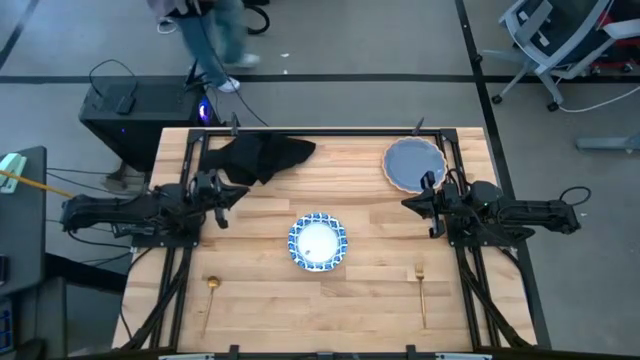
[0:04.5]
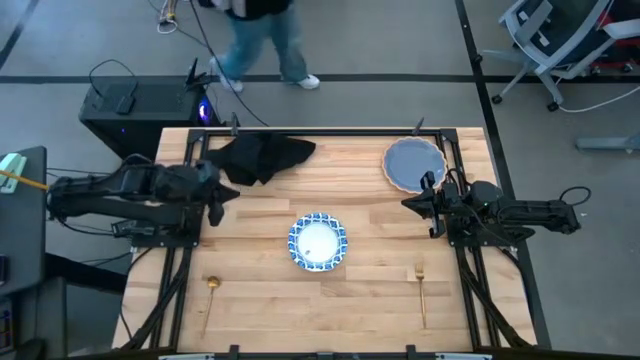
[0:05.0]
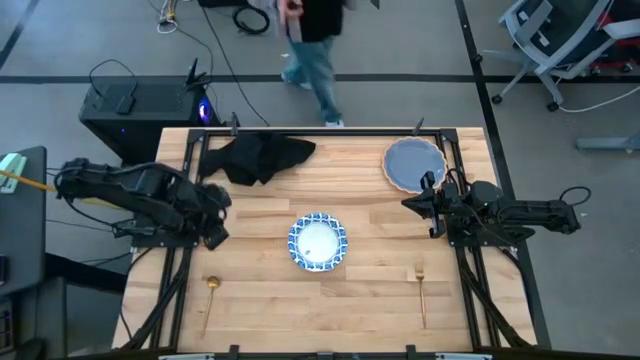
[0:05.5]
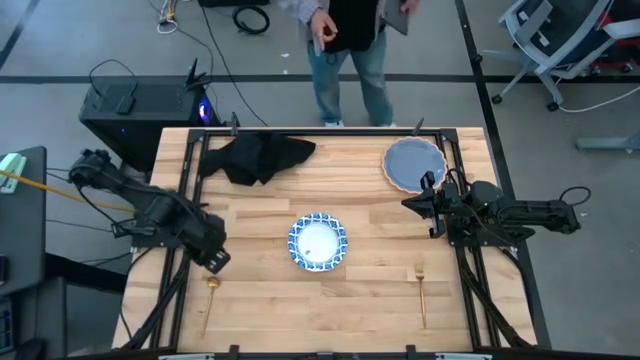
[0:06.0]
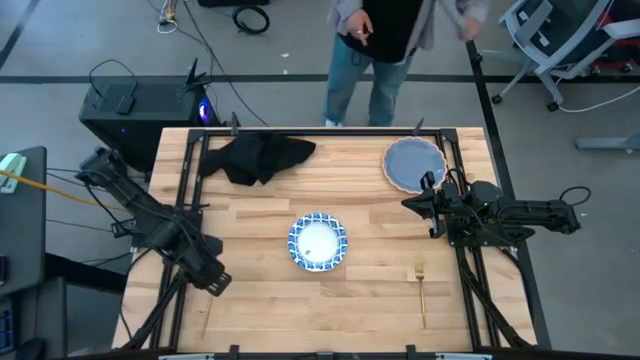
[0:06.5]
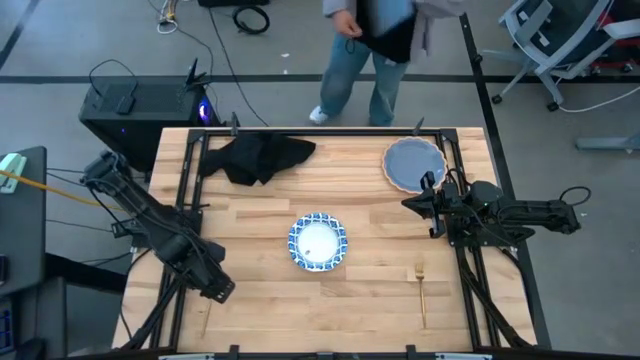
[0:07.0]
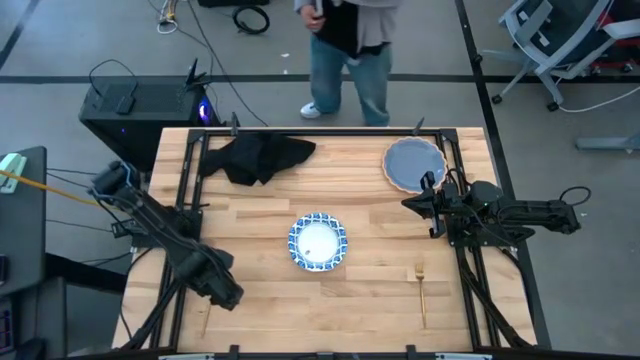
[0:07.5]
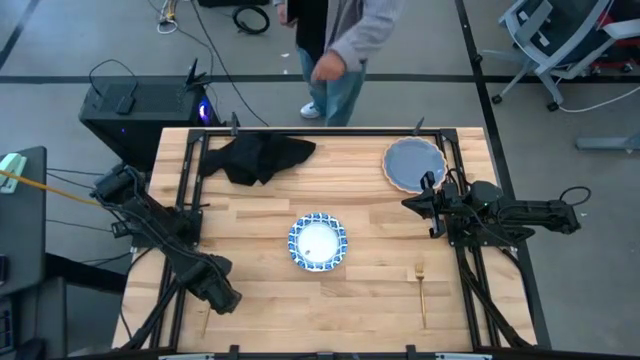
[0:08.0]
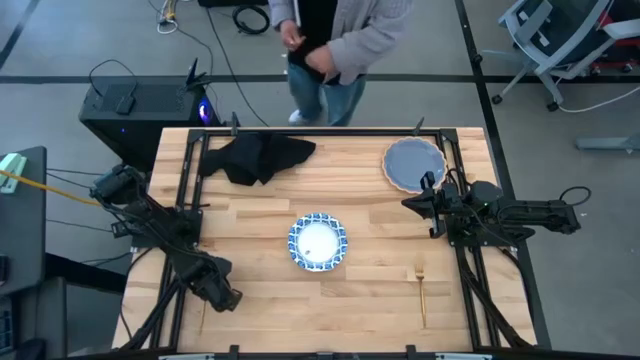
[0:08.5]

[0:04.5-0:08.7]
Task: Set table place
Move the golden spoon to the left of the white bowl

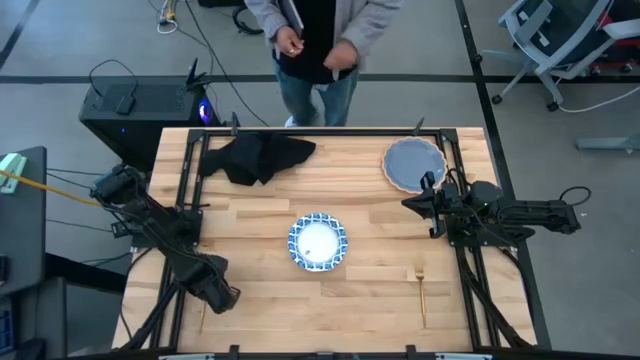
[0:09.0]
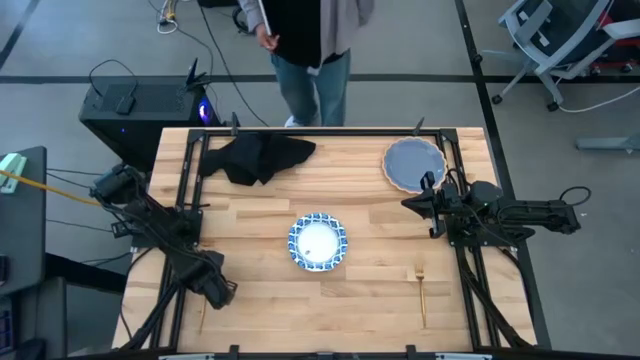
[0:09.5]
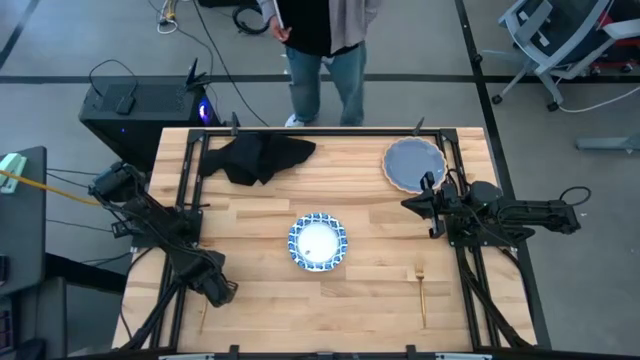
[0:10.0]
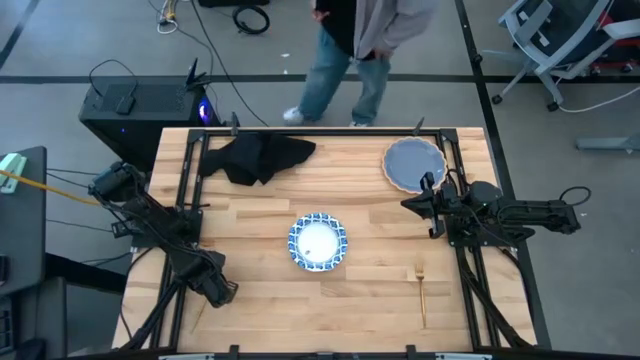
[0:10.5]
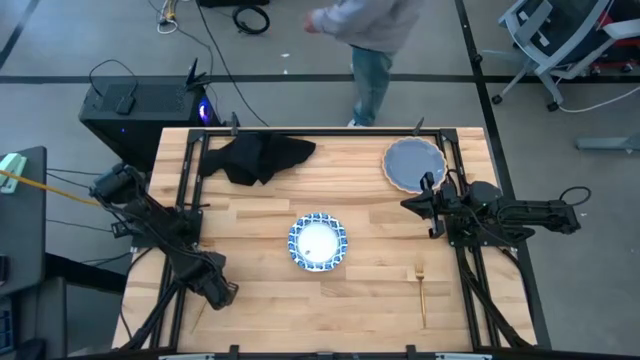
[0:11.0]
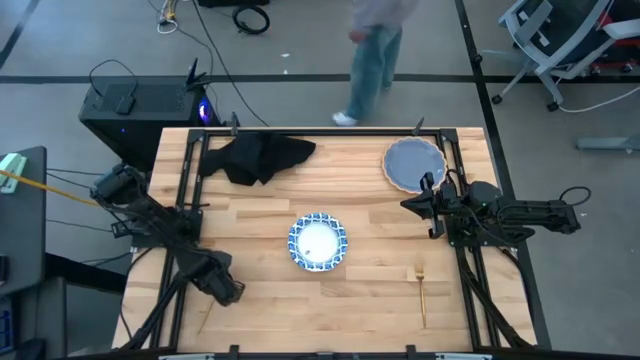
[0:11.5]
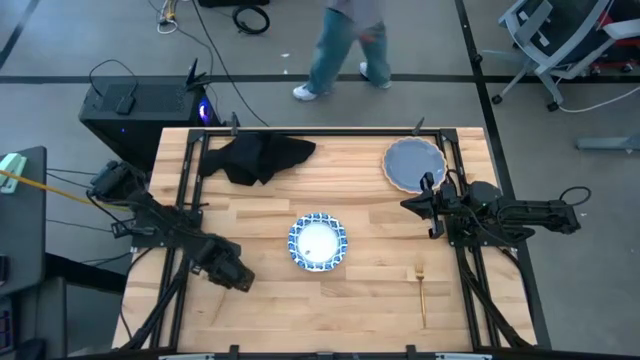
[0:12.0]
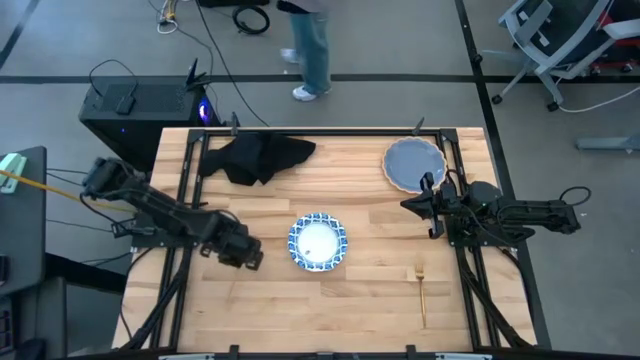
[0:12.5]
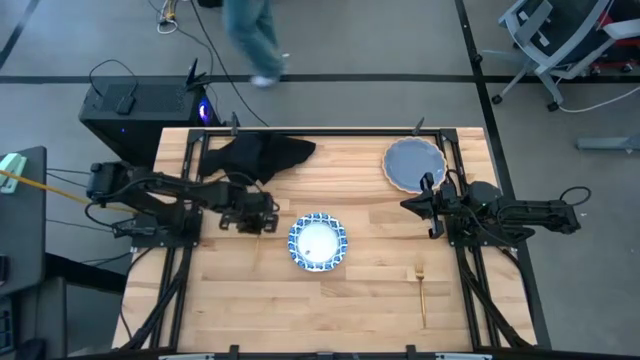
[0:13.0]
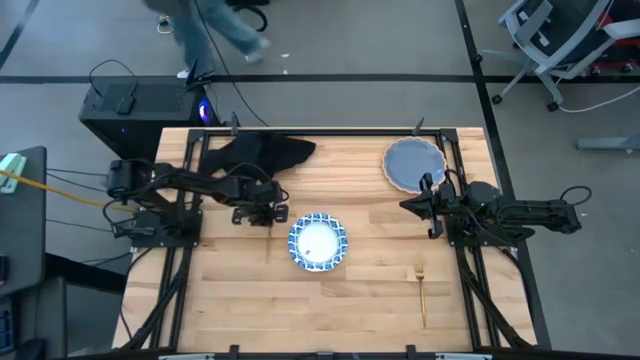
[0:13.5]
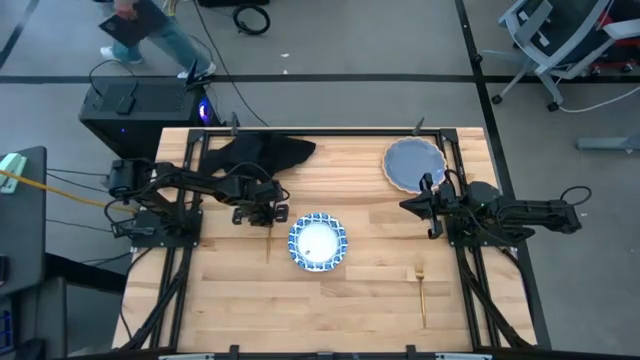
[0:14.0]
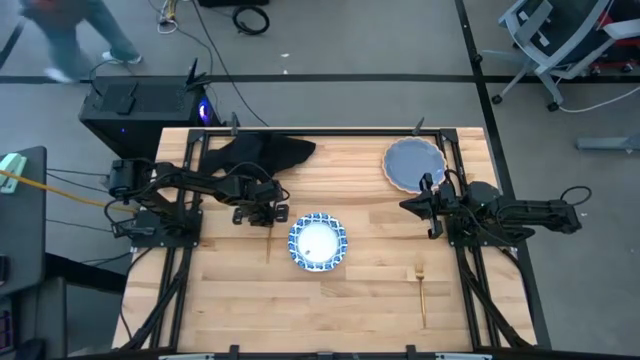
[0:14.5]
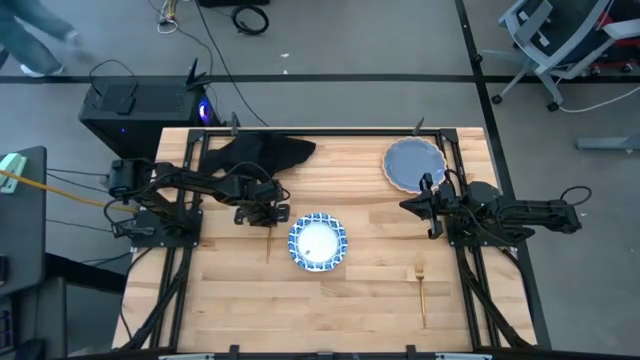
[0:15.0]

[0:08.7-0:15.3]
Move the golden spoon to the left of the white bowl

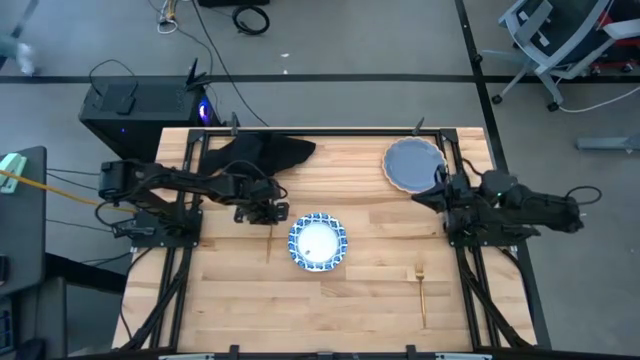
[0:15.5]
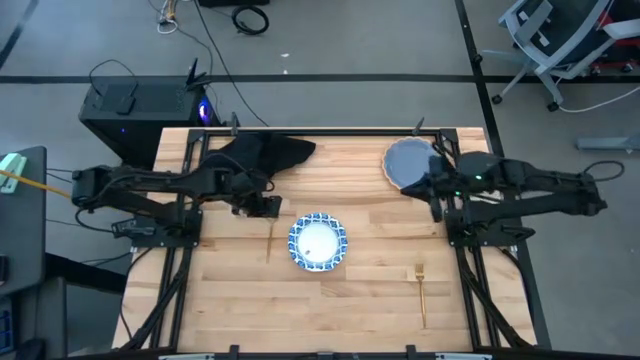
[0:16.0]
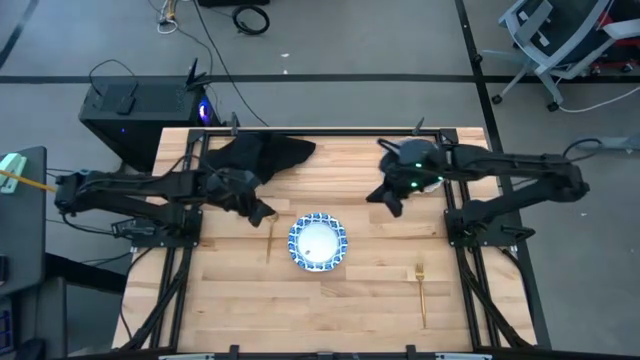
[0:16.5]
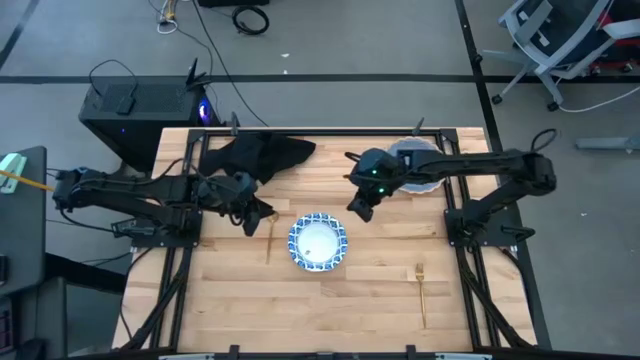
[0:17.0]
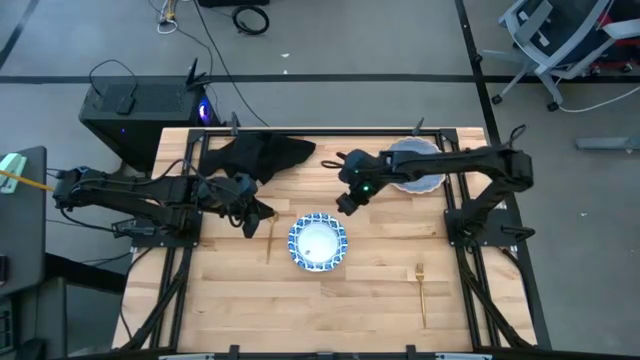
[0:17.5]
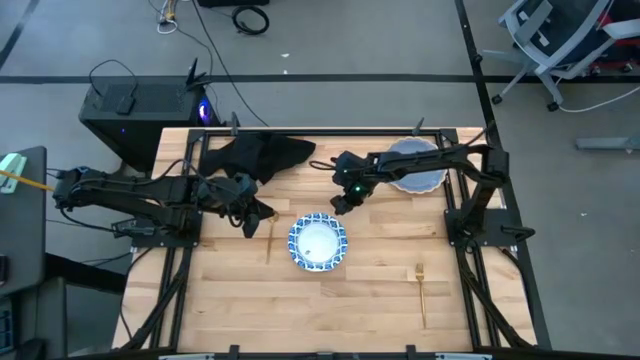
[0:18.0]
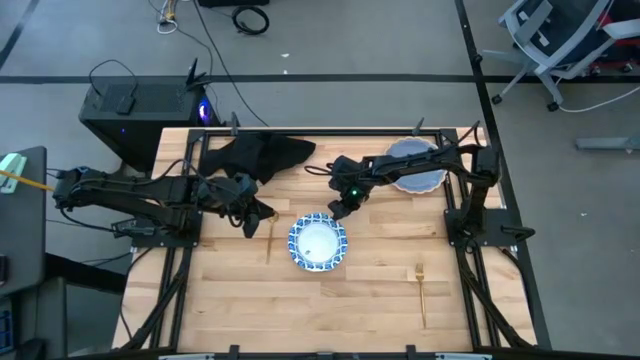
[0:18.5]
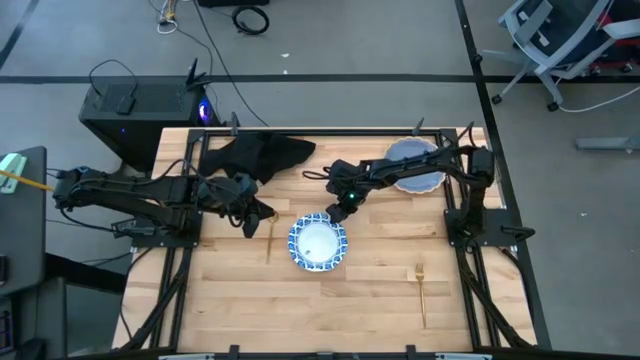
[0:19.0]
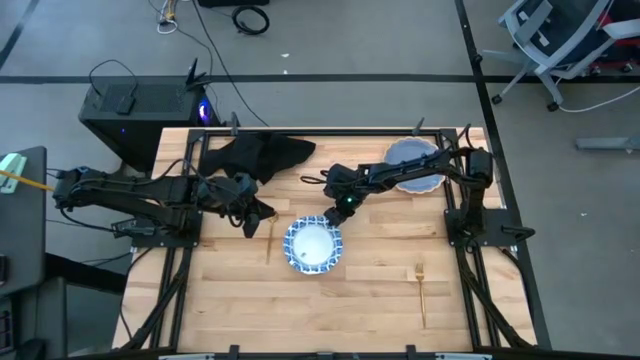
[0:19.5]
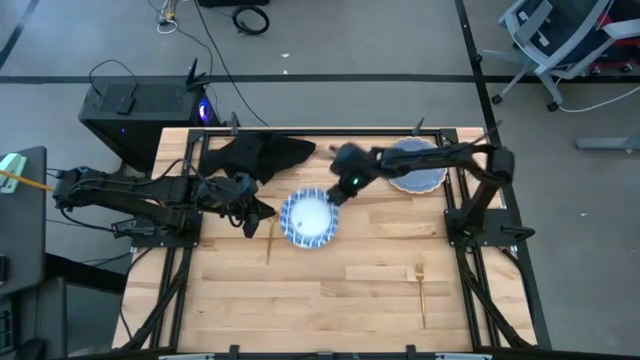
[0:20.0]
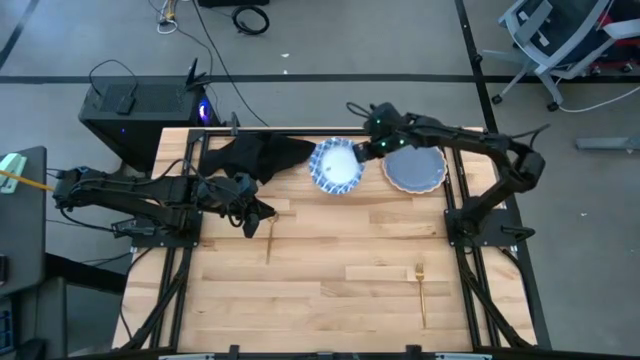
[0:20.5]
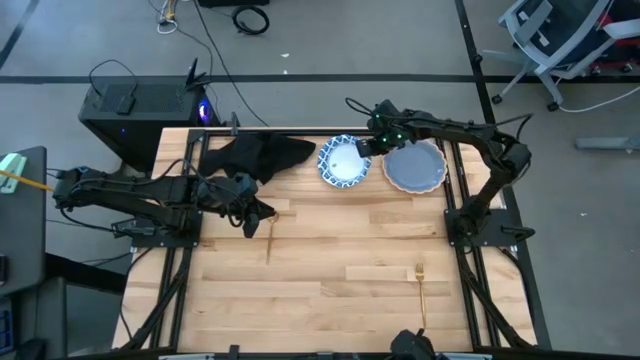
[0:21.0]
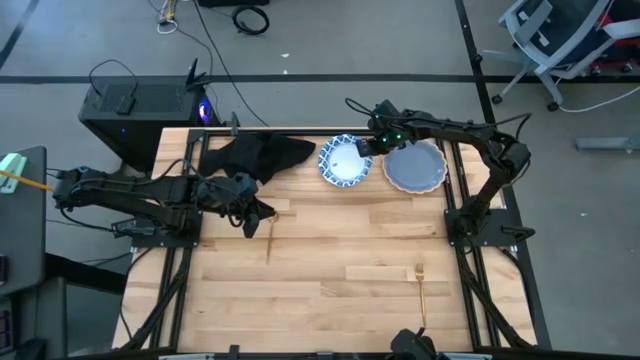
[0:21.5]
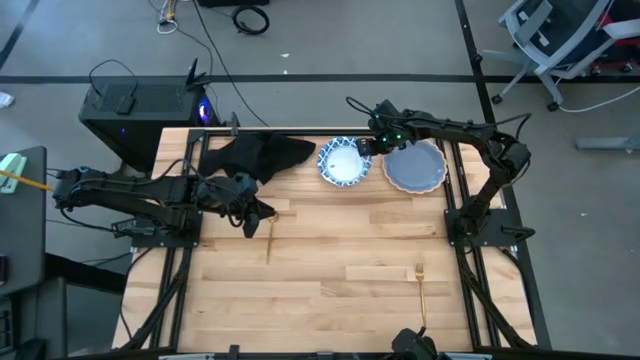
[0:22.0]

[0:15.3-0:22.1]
Move the white bowl to the top of the table

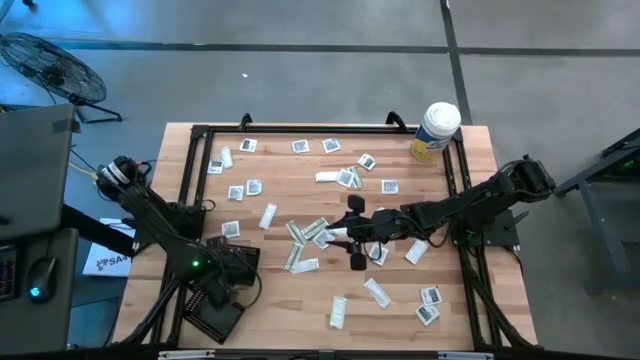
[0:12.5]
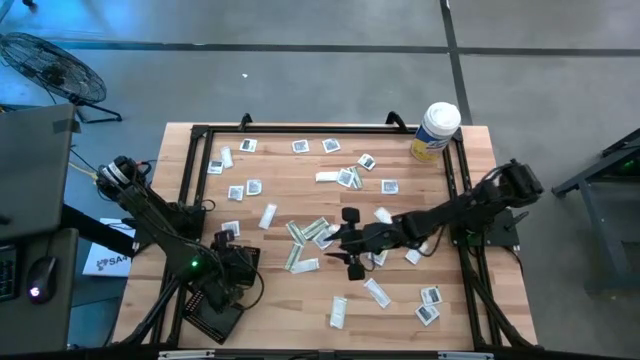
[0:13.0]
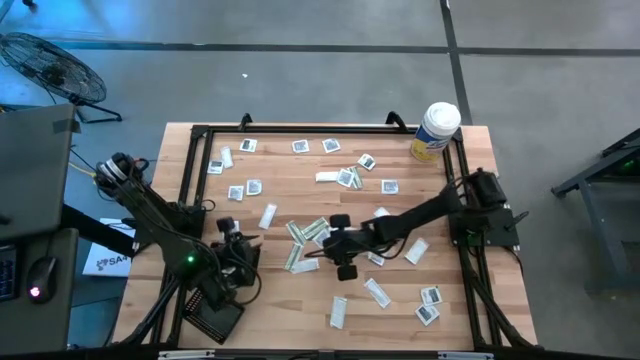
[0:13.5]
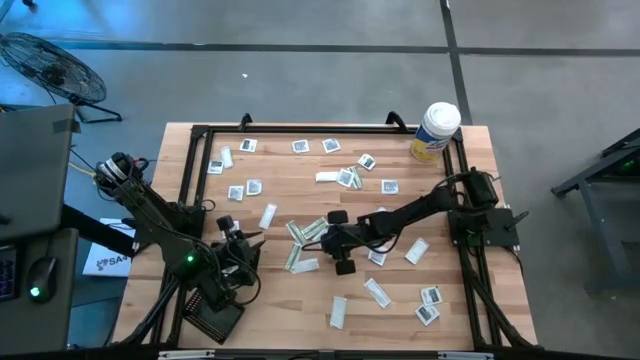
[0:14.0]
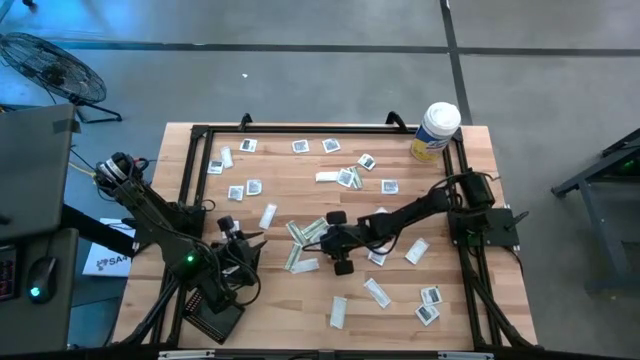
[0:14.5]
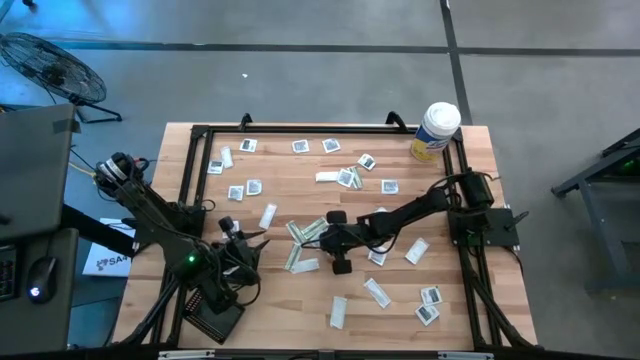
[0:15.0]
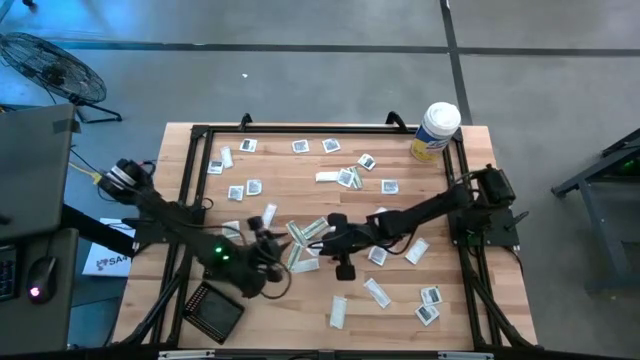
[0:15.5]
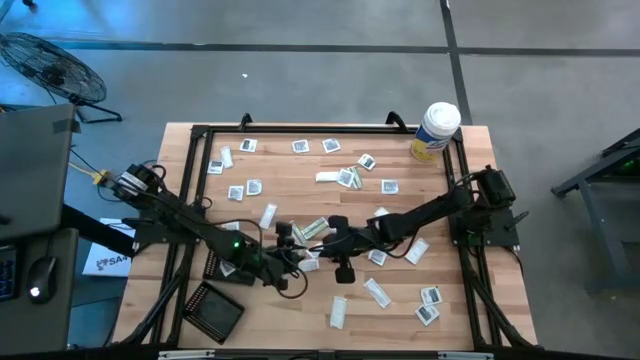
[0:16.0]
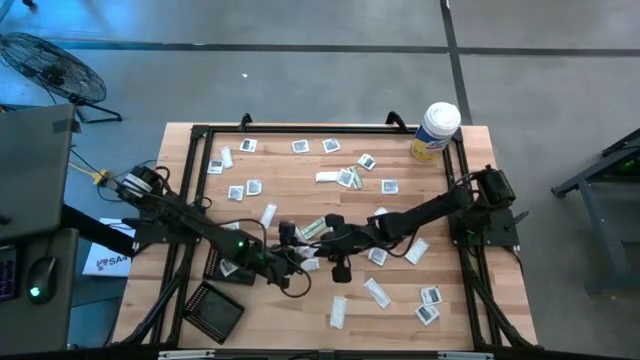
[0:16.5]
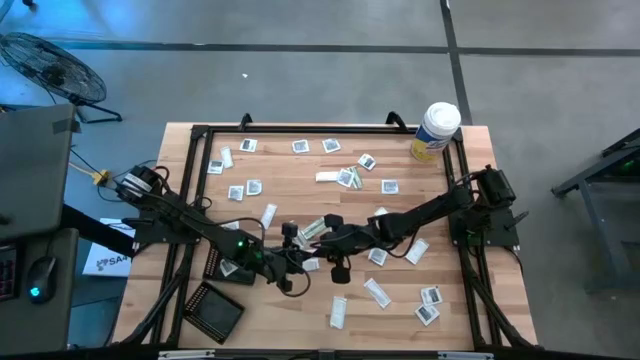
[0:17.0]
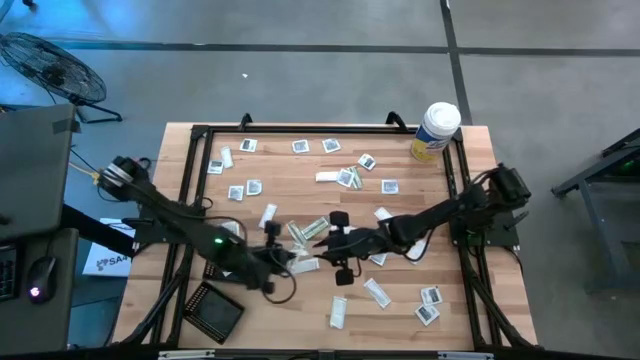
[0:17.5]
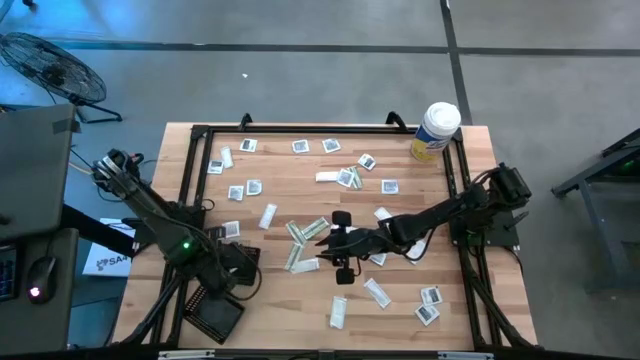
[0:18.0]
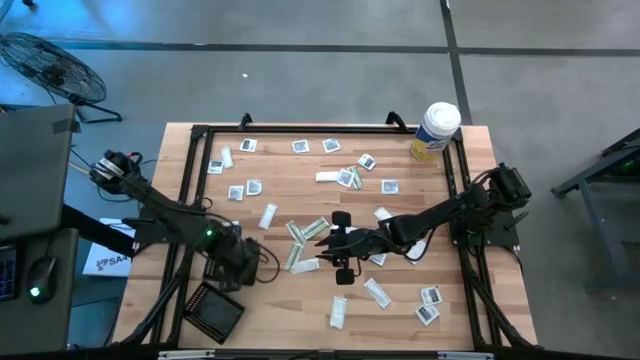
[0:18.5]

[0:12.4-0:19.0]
Task: Pick & Place First Aid Supplies
Put the towelette pack into the top black bin
